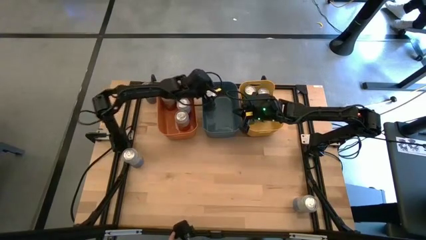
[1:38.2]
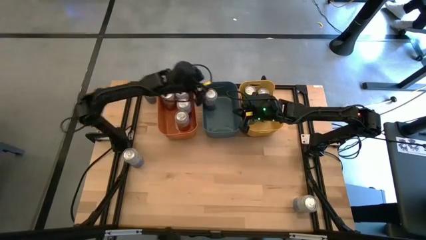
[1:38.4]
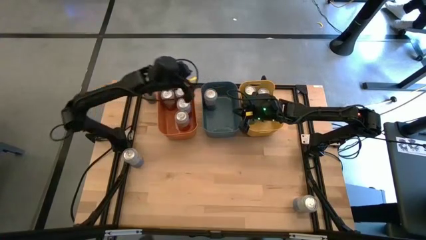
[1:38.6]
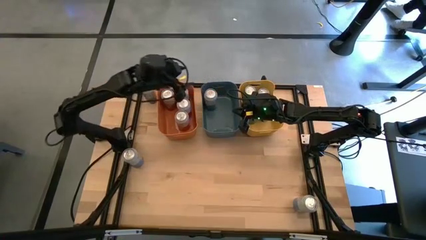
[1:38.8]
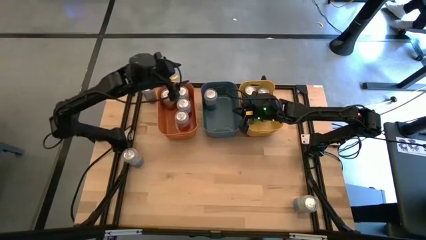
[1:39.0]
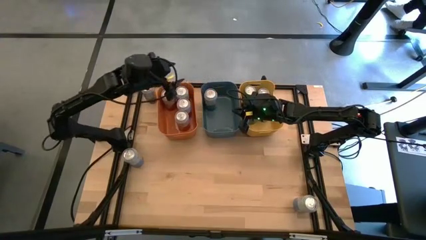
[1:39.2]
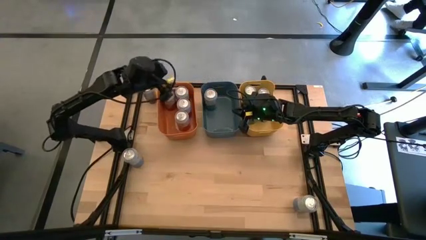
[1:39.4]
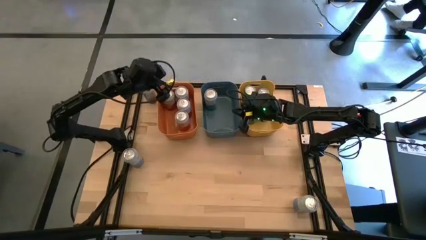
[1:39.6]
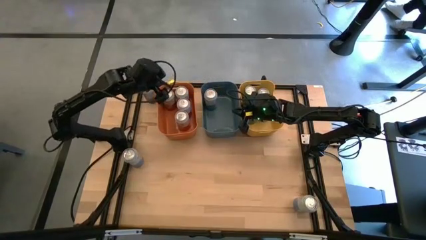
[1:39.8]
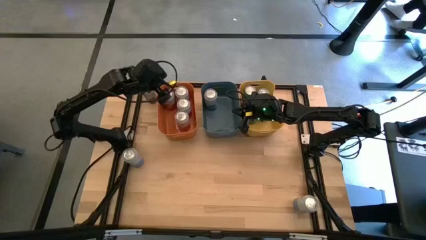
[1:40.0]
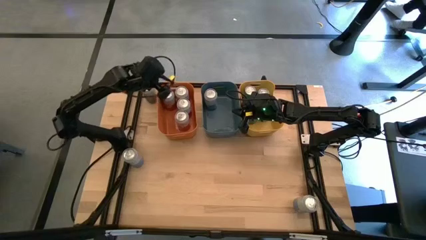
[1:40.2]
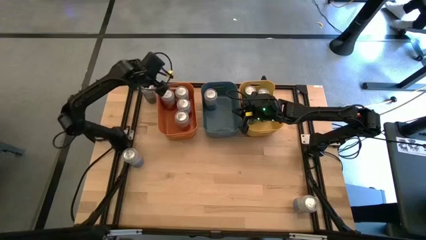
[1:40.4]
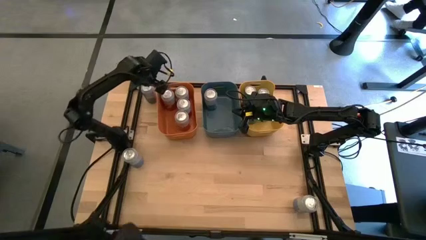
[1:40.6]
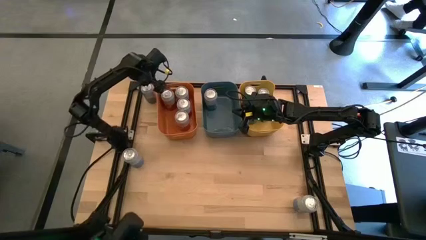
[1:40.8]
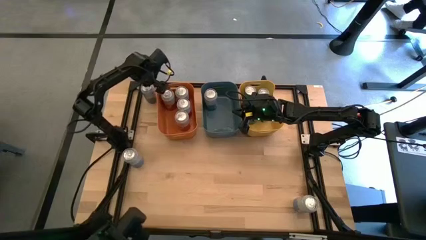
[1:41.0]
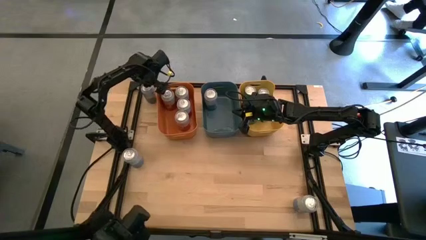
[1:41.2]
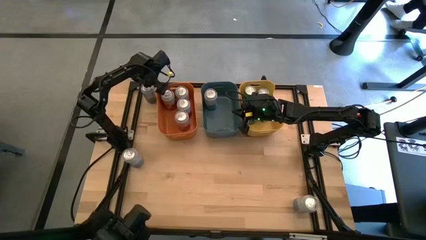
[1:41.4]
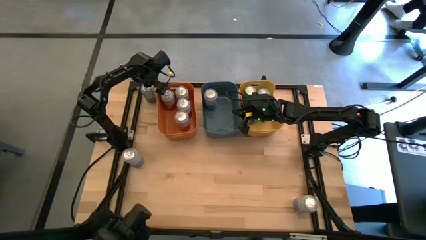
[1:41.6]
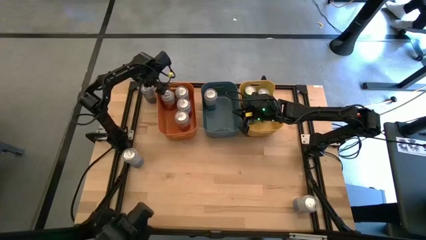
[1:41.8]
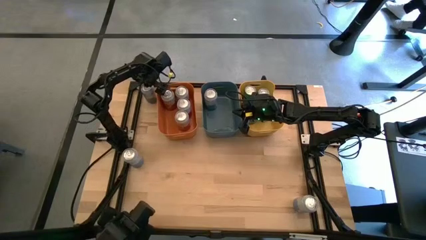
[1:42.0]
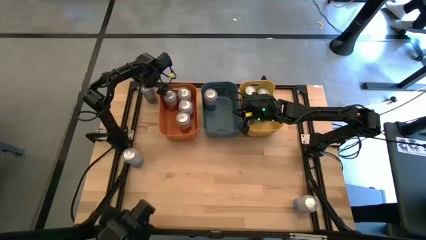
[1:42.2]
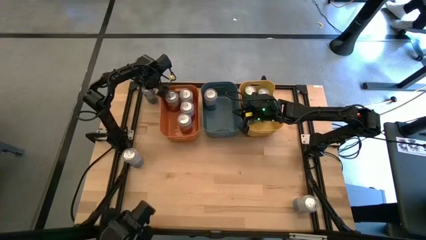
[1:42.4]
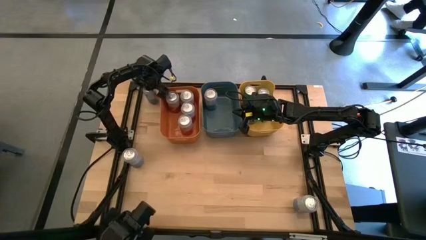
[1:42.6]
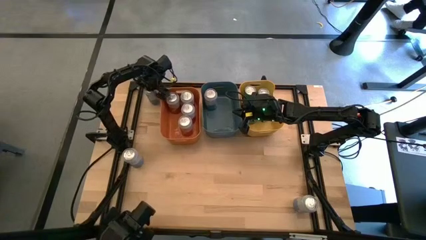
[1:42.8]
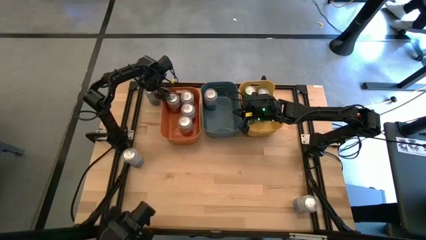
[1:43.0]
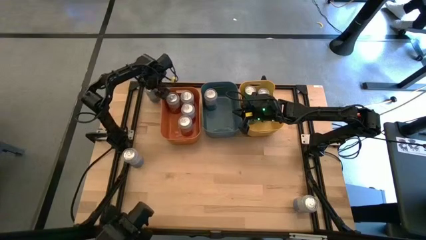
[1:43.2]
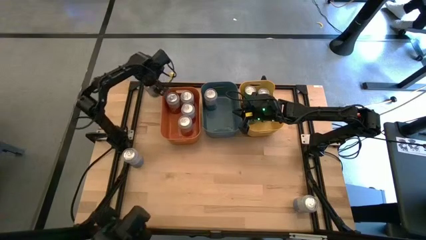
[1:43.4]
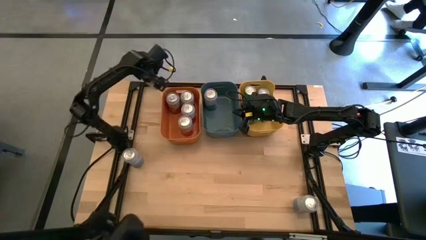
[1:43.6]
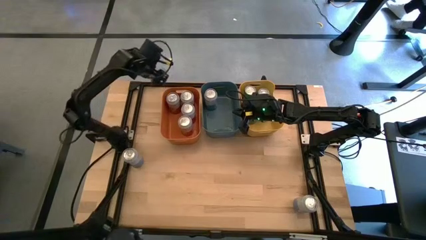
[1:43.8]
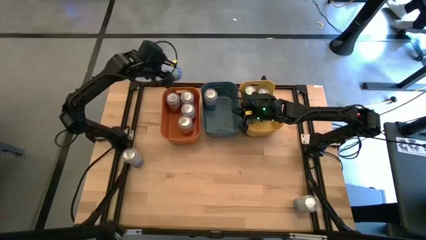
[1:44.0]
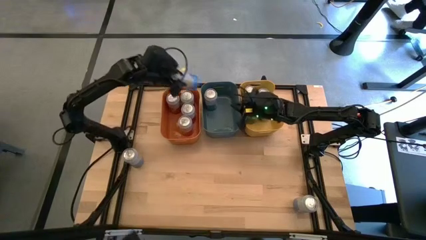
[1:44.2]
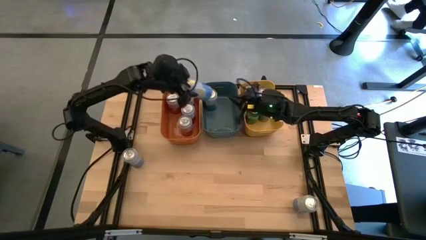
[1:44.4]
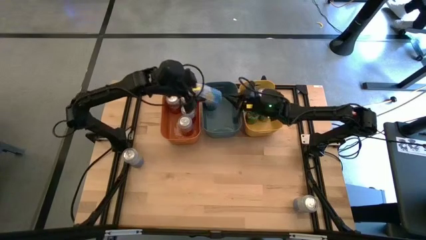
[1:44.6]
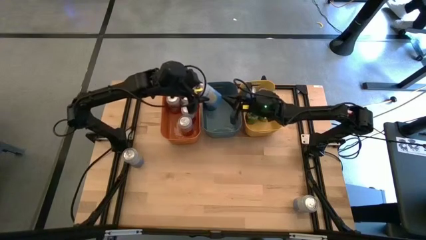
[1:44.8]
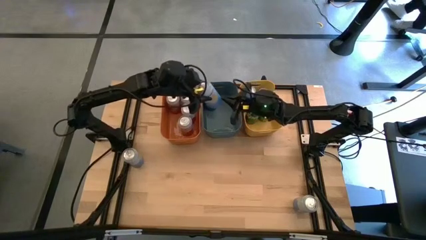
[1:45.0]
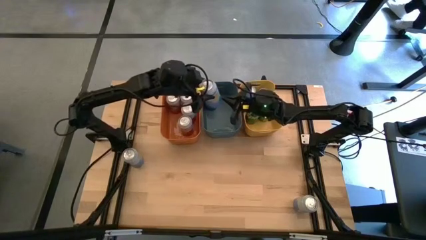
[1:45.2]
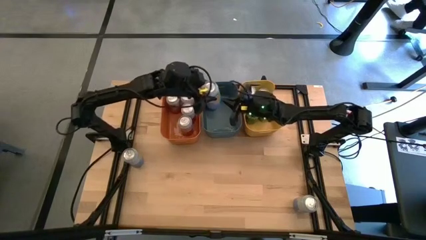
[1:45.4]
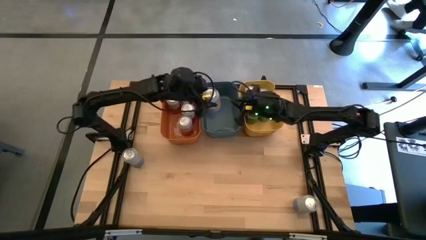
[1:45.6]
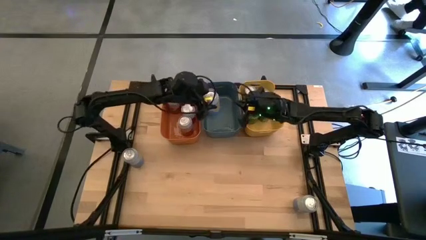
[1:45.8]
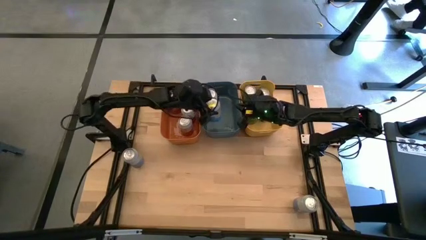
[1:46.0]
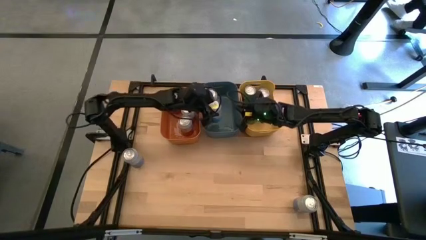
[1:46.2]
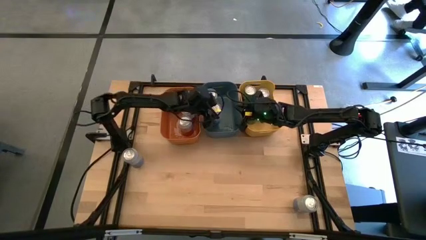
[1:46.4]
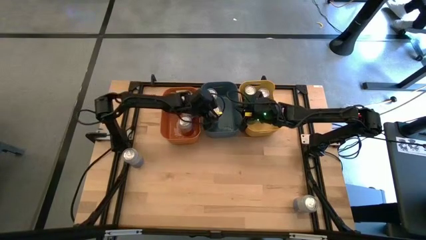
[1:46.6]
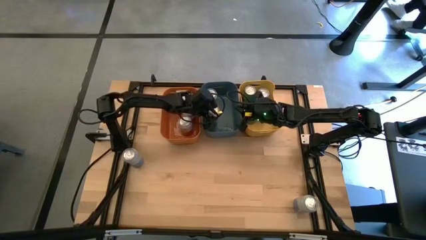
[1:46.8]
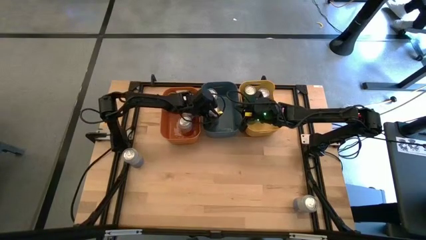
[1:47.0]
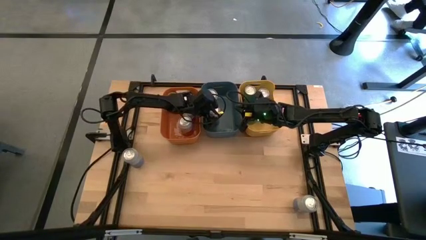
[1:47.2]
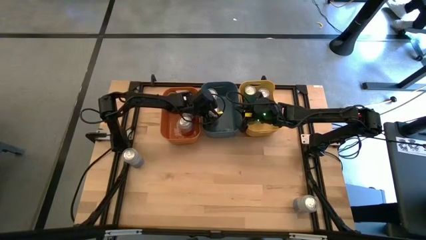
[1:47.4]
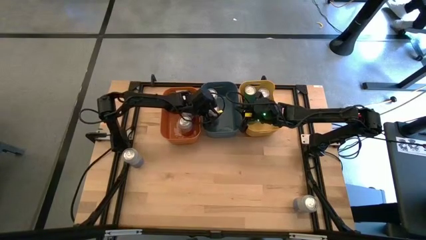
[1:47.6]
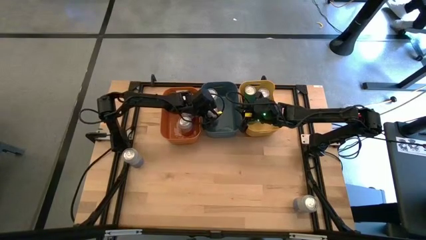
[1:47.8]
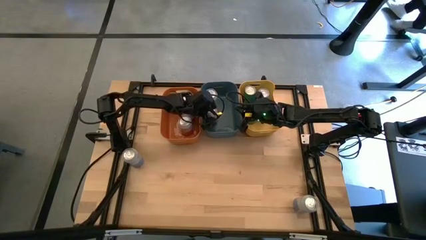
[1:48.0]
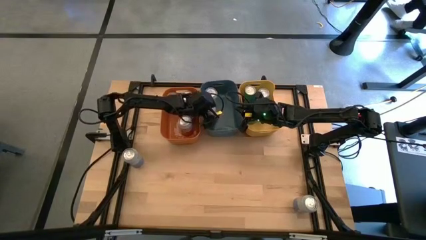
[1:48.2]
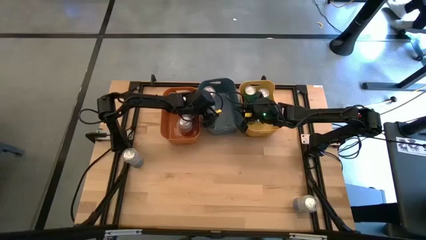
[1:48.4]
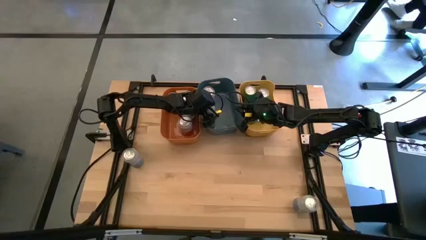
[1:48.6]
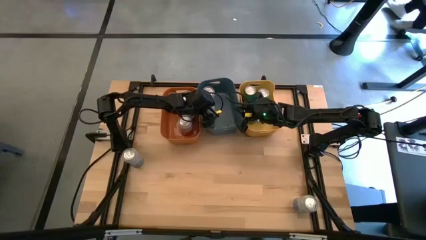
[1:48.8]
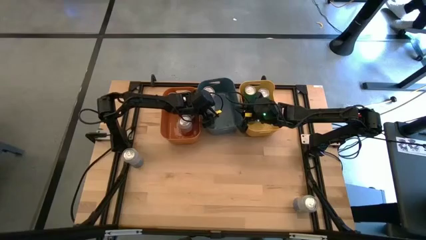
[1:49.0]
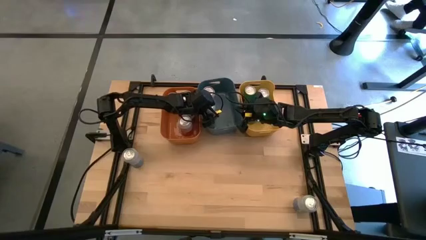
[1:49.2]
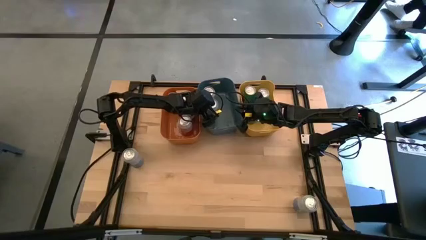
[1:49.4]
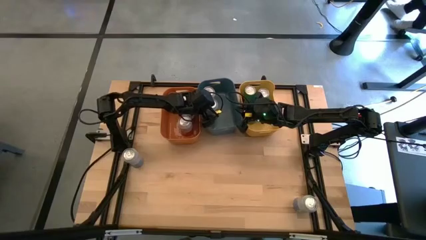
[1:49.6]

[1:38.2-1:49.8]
Task: Sort soda cans
Put the blue-white soda can into the blue bin
